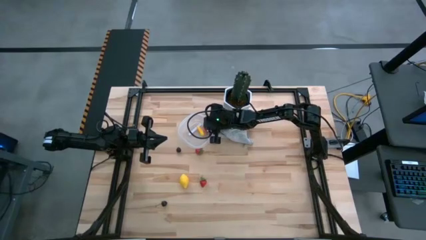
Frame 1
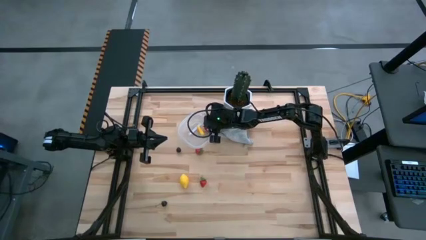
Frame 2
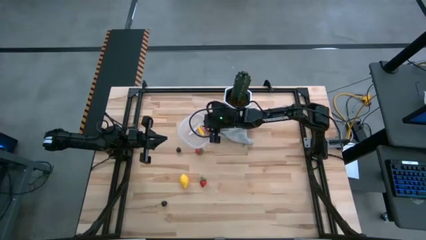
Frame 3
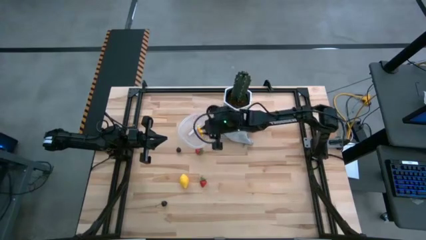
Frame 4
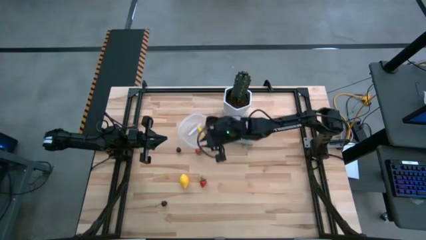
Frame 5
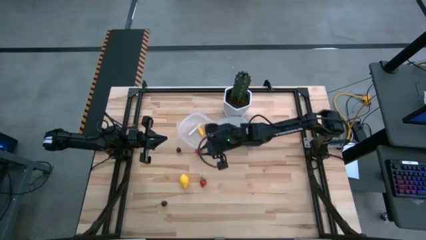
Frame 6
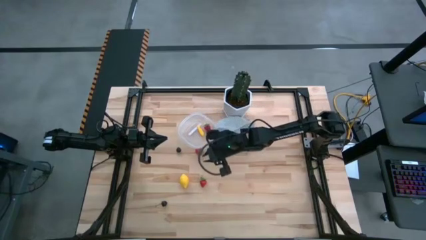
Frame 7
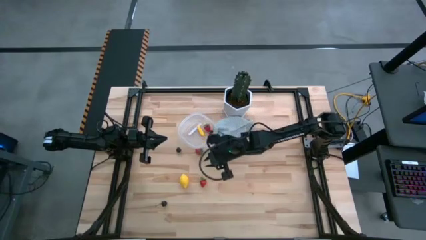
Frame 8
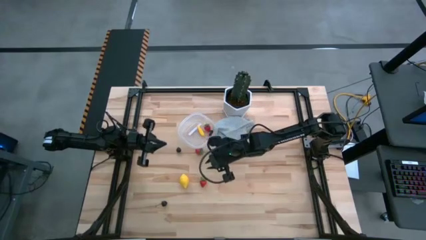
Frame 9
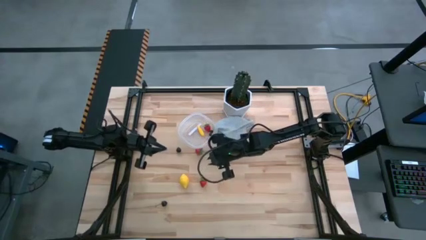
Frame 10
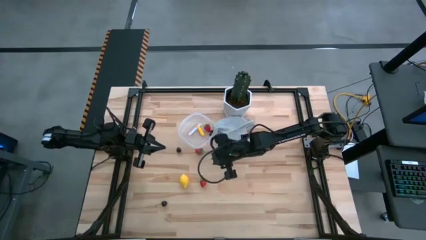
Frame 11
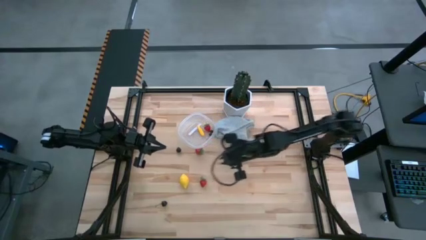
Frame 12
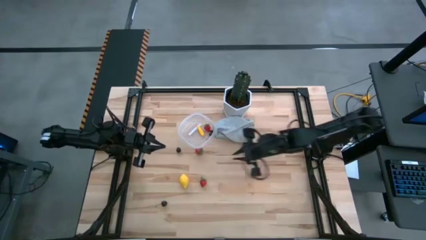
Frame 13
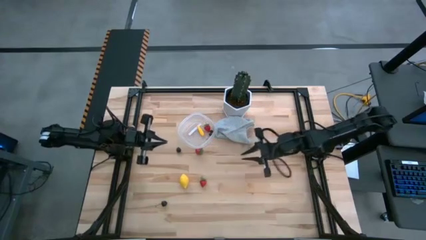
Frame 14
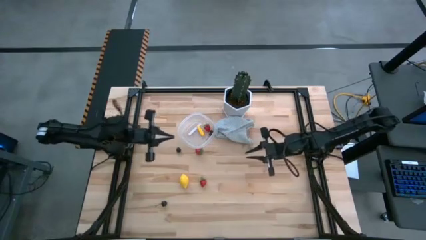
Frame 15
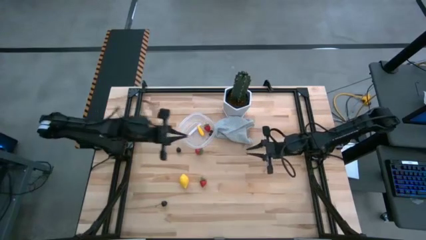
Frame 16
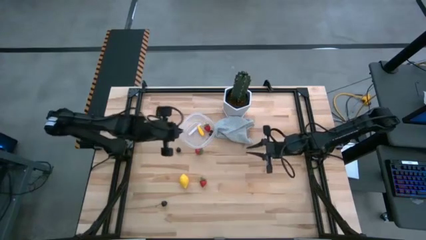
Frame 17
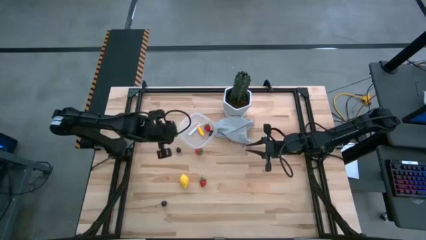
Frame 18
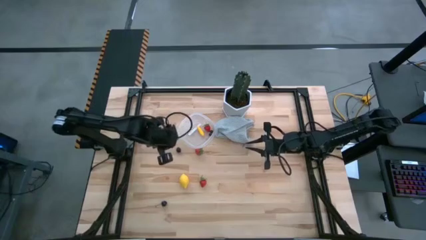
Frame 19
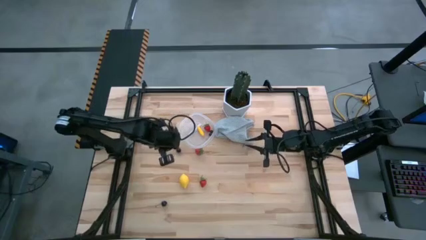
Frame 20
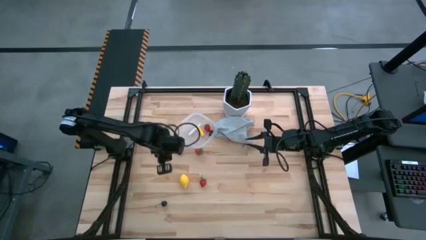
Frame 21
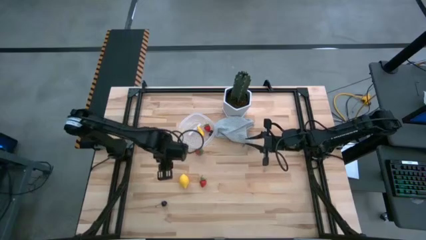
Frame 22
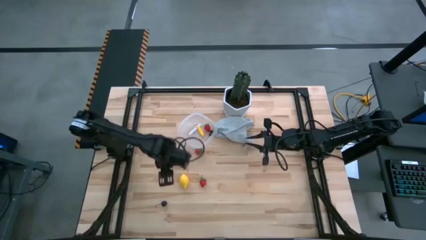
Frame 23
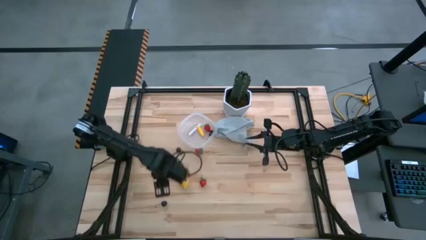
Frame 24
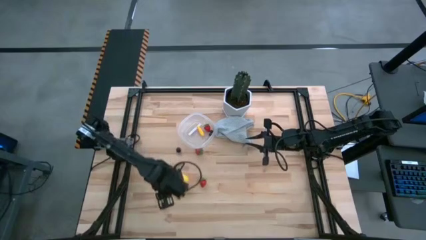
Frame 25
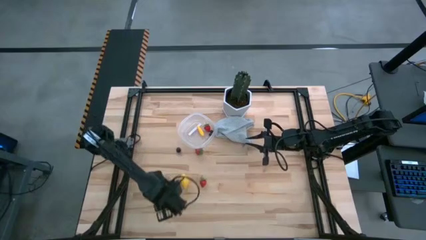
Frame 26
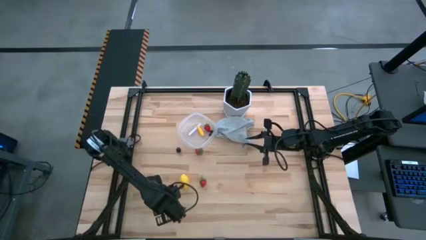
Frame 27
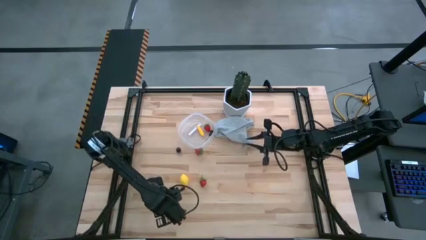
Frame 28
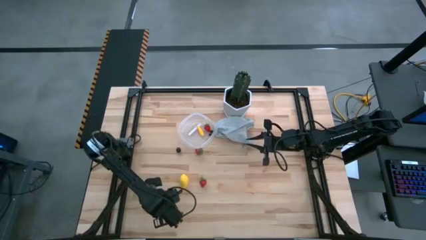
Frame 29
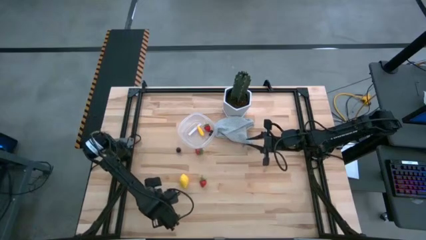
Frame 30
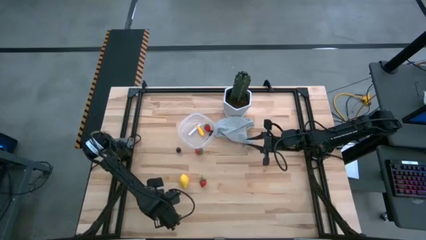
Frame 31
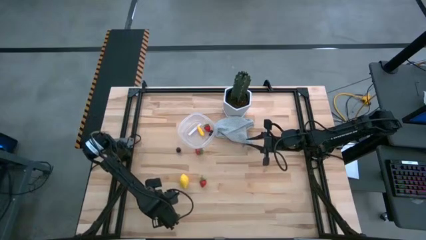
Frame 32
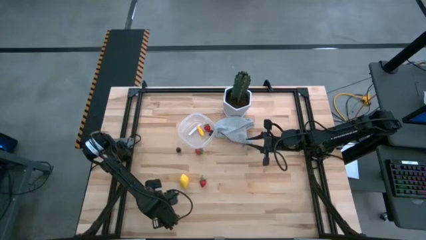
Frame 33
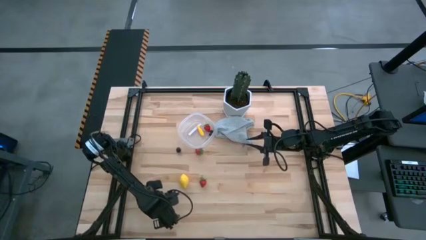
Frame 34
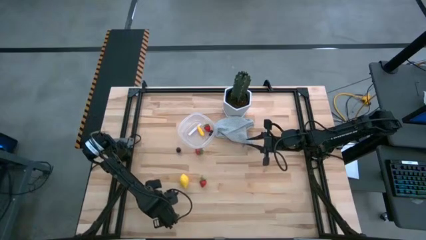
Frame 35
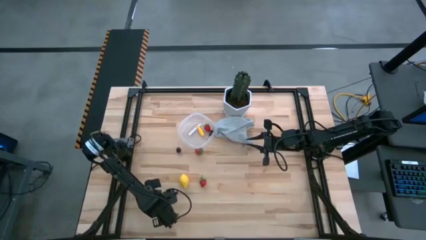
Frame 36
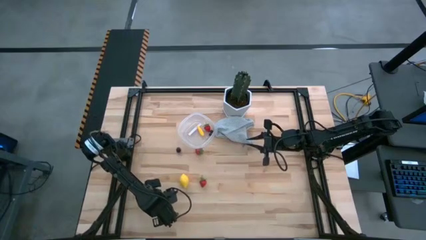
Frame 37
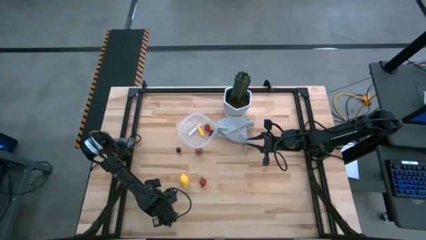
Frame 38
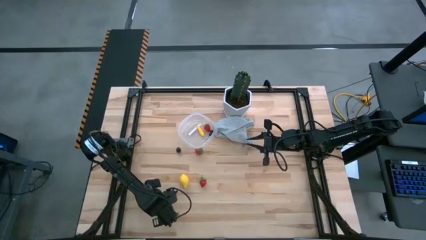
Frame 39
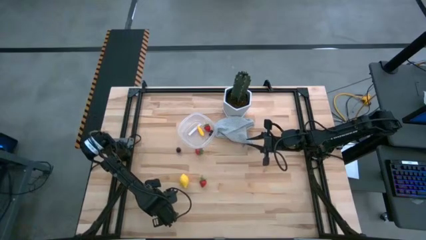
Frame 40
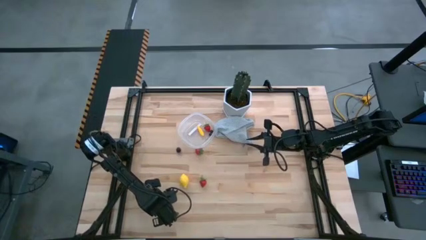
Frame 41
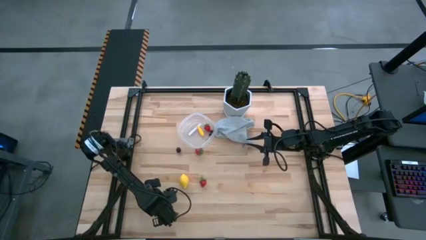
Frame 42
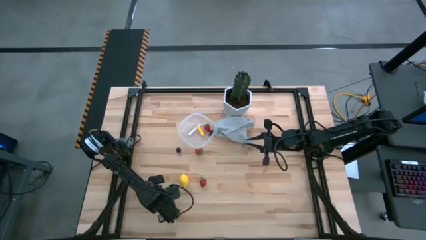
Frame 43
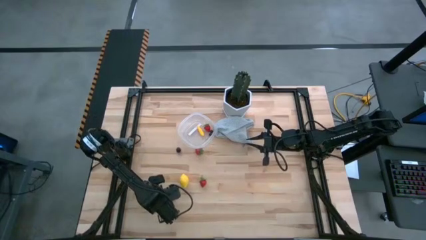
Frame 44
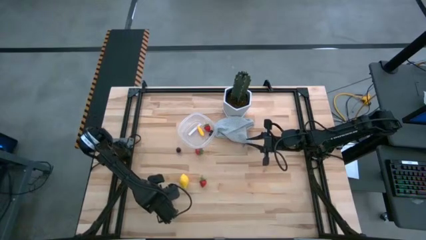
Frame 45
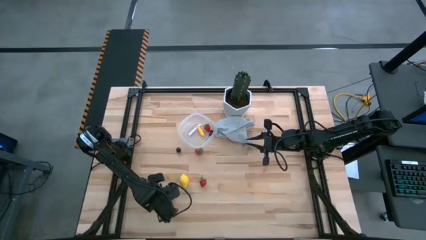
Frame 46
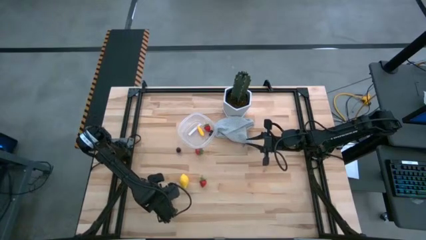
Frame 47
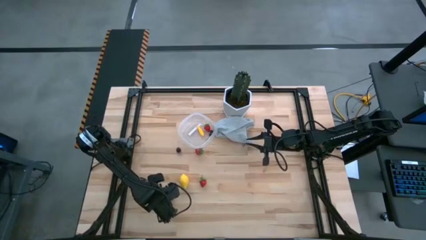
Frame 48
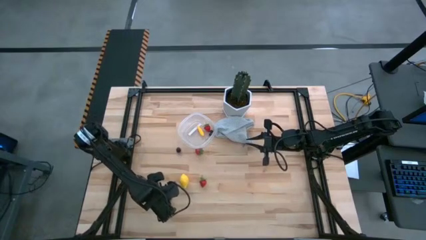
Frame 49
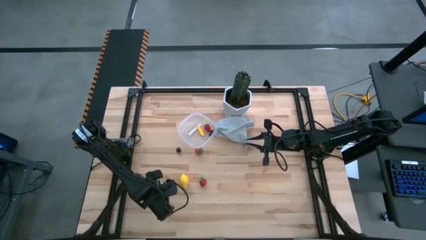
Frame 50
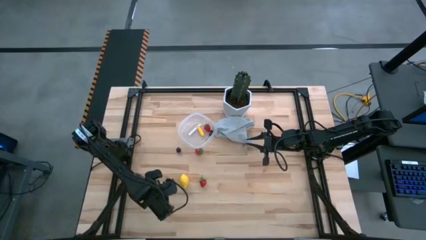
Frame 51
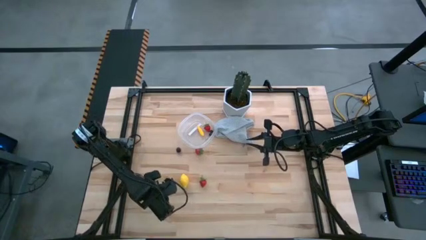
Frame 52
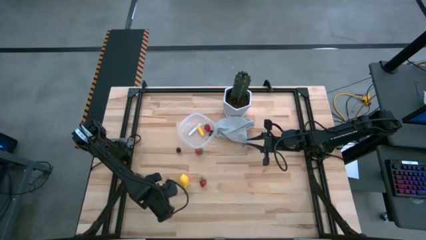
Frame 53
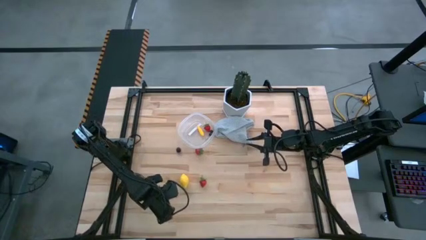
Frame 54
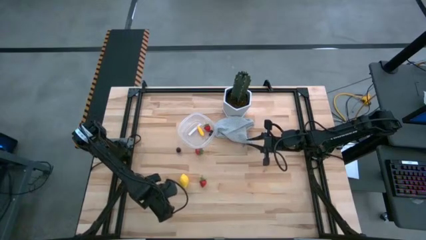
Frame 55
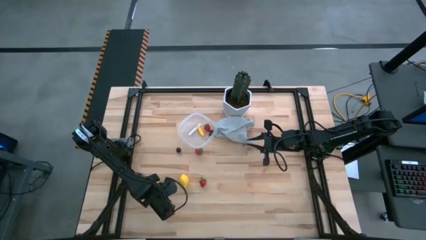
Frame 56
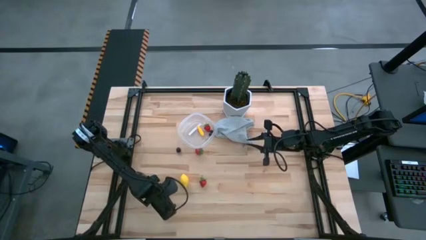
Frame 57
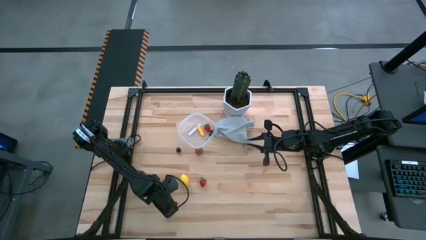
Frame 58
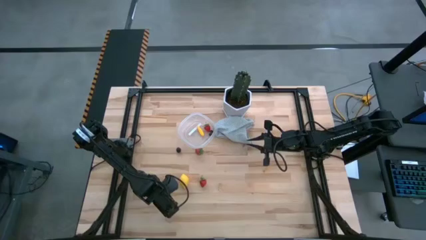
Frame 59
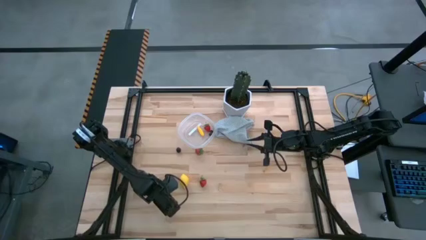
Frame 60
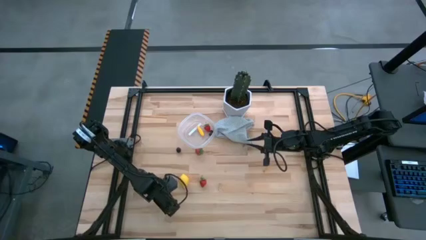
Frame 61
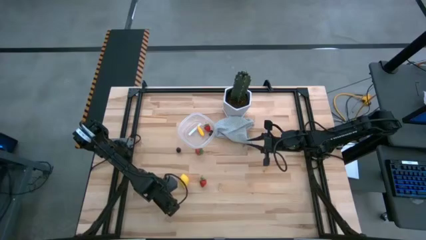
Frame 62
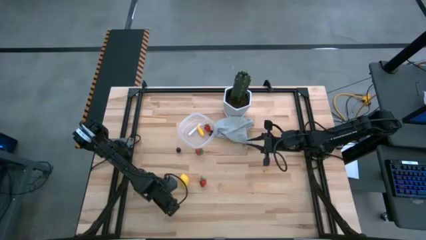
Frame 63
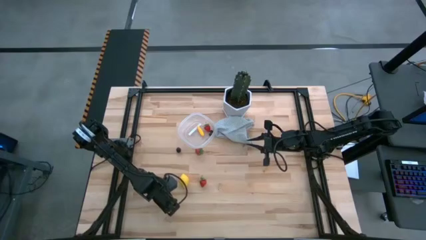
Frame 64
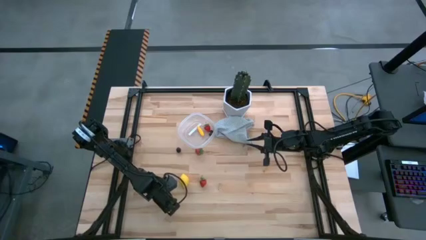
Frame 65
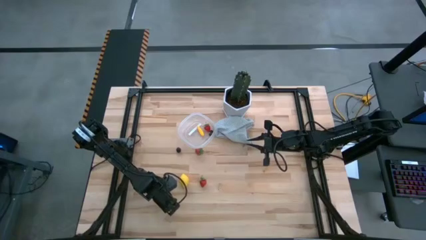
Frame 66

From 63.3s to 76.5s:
Task: Pick and placing Produce into tupperware
Put the black cherry into the transparent bin

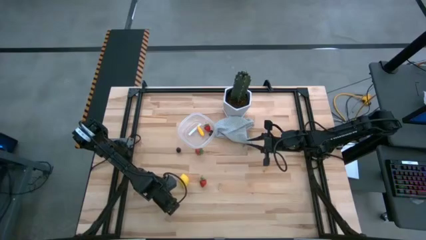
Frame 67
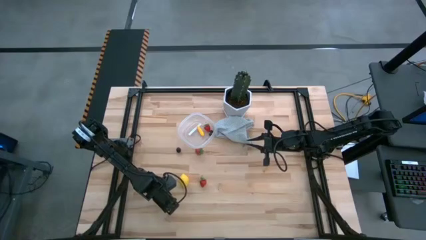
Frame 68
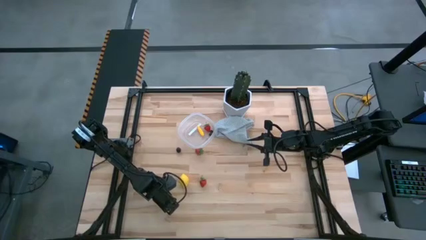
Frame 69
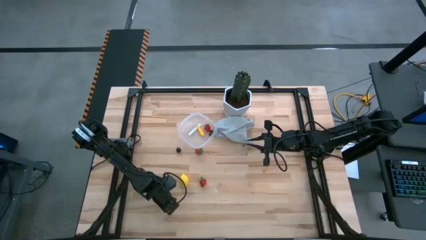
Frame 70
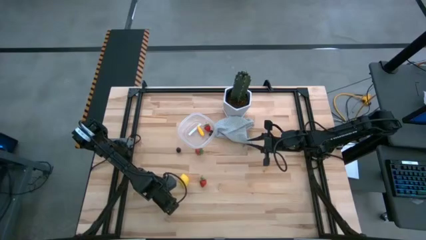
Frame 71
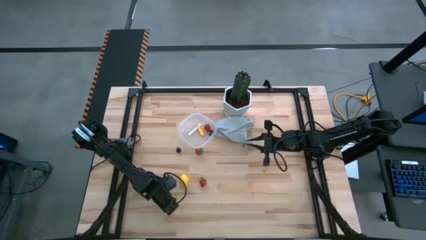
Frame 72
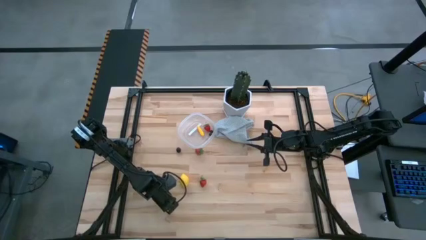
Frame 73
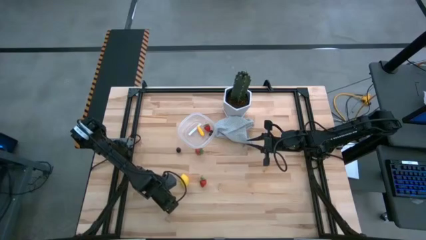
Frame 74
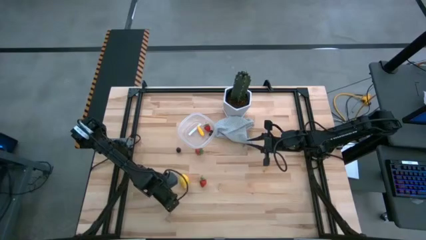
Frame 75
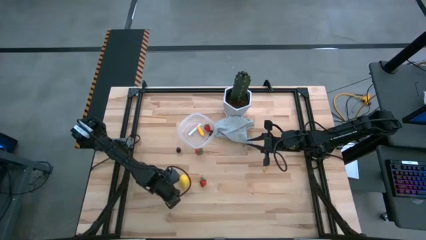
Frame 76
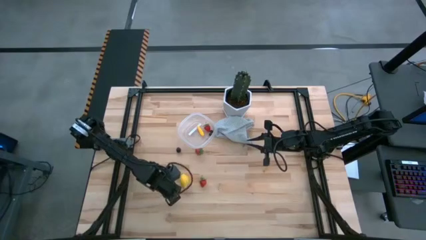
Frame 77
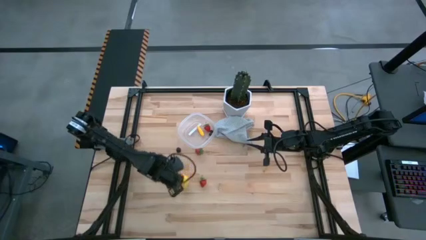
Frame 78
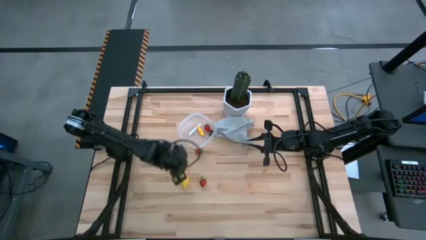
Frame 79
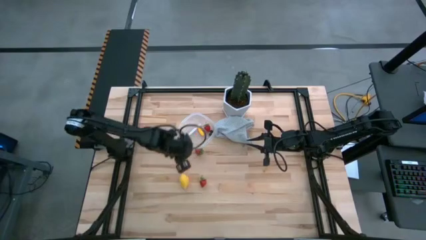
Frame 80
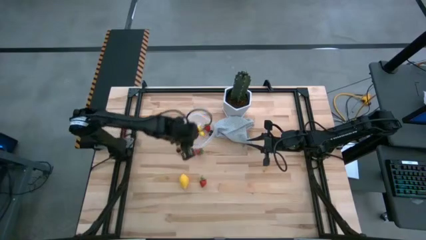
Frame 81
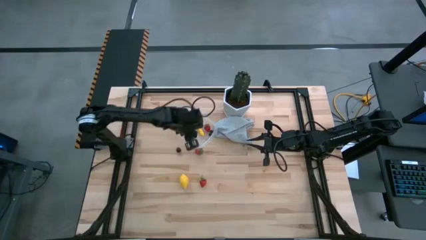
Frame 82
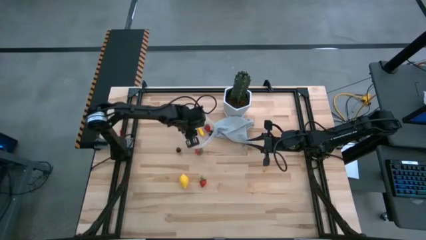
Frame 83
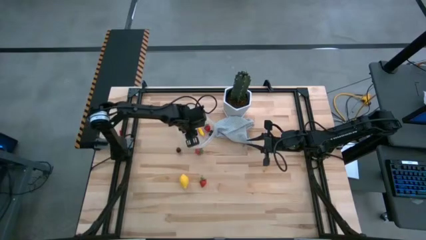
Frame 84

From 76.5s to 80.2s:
Put the black cherry into the transparent bin
